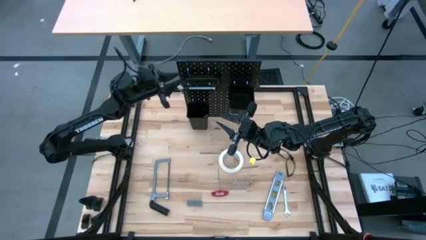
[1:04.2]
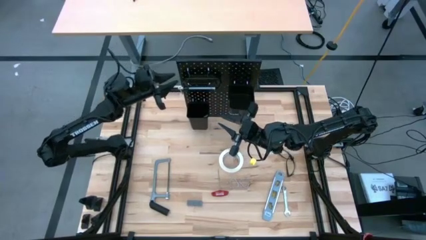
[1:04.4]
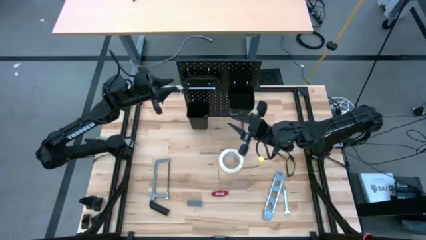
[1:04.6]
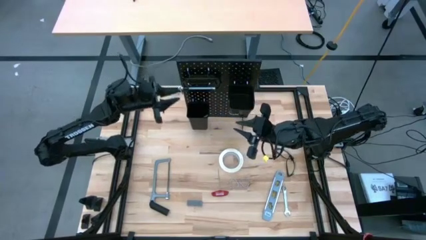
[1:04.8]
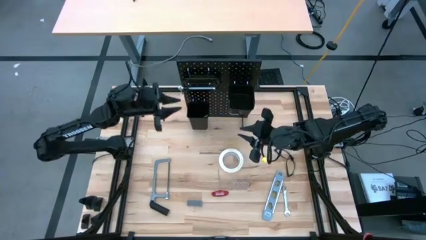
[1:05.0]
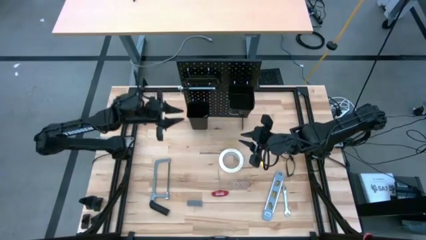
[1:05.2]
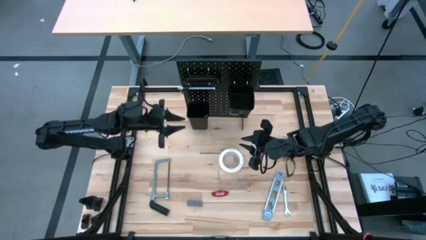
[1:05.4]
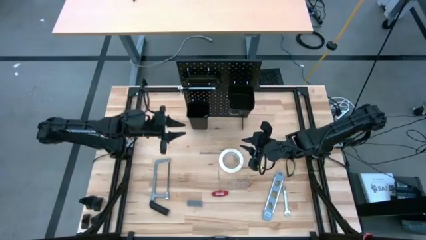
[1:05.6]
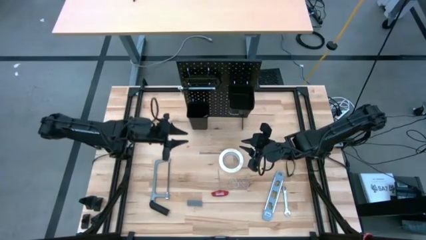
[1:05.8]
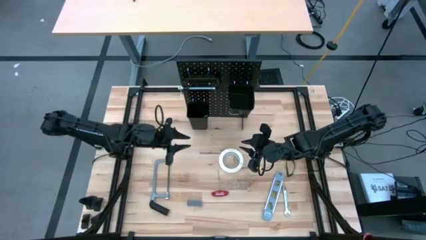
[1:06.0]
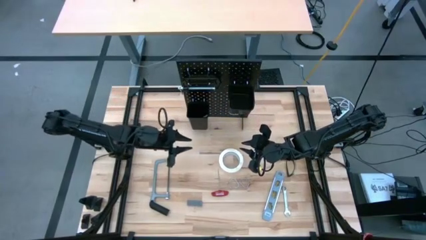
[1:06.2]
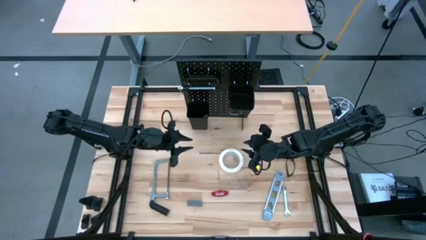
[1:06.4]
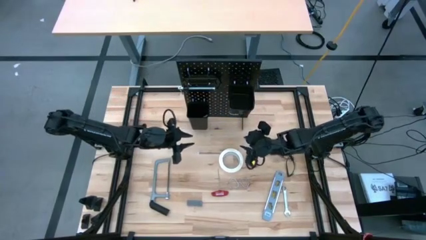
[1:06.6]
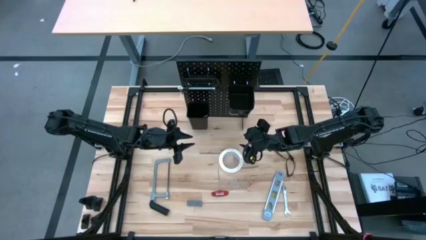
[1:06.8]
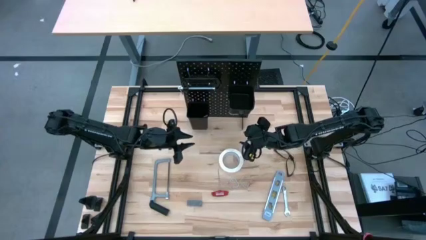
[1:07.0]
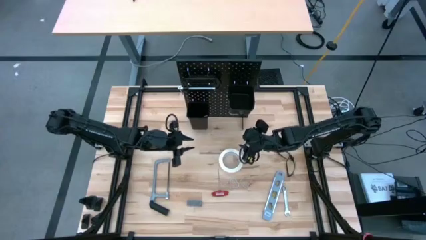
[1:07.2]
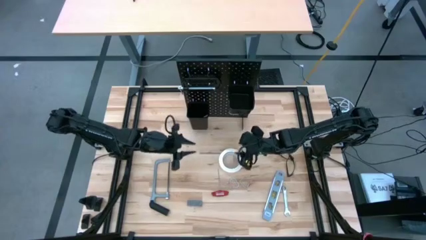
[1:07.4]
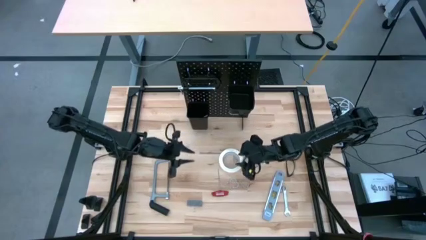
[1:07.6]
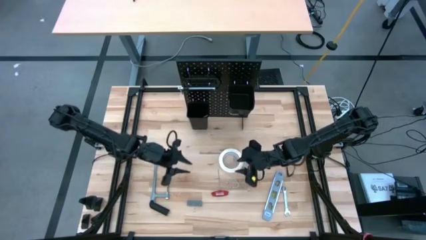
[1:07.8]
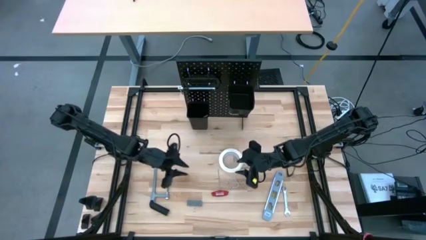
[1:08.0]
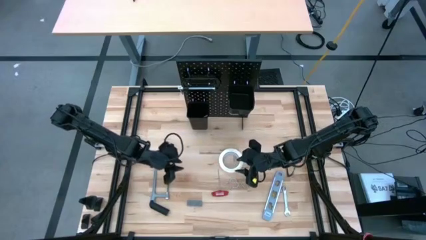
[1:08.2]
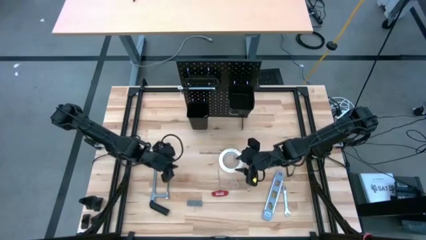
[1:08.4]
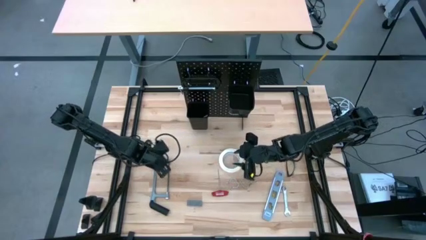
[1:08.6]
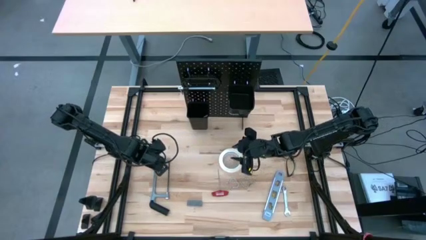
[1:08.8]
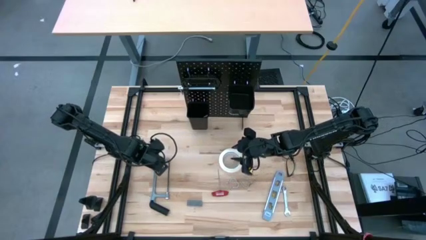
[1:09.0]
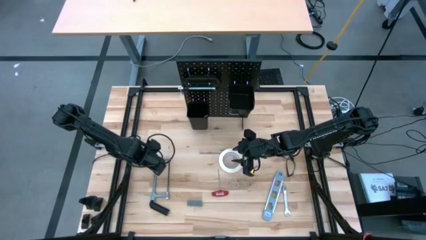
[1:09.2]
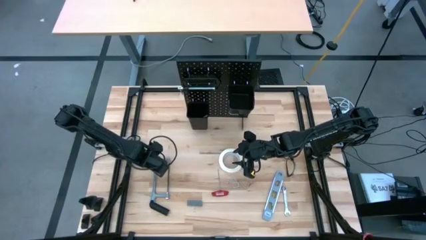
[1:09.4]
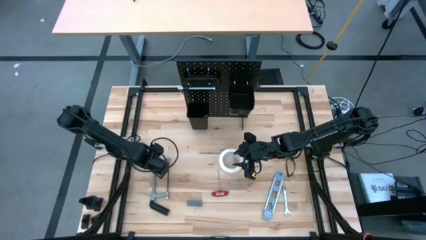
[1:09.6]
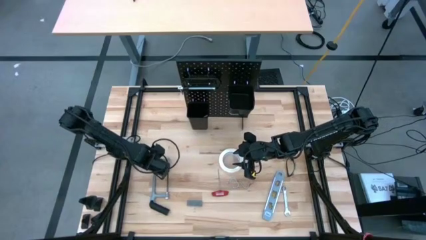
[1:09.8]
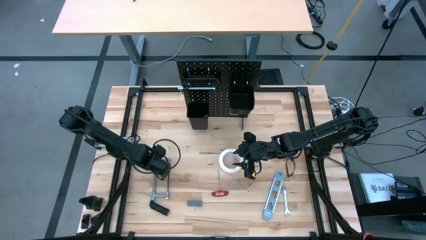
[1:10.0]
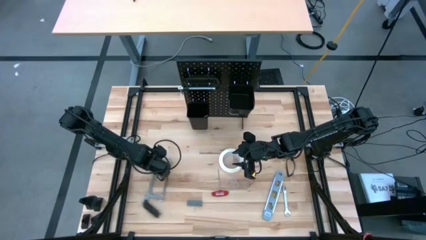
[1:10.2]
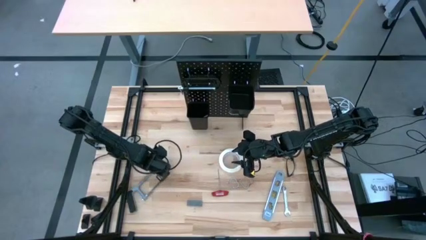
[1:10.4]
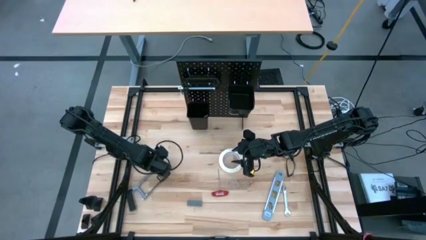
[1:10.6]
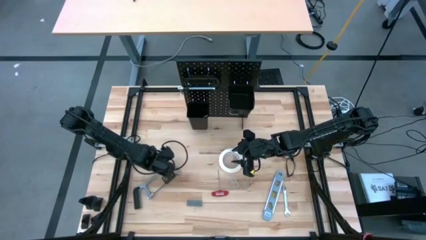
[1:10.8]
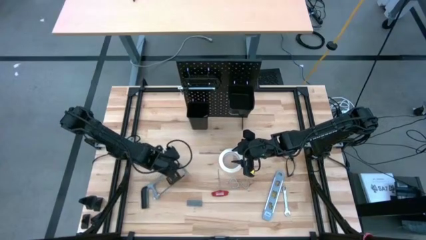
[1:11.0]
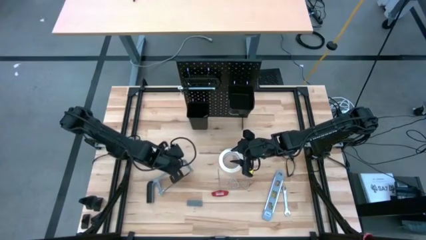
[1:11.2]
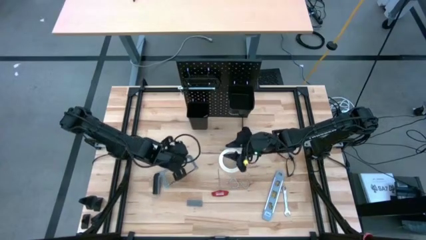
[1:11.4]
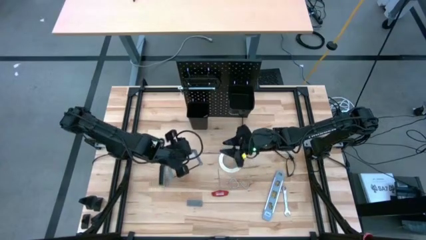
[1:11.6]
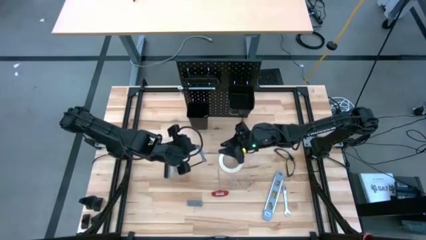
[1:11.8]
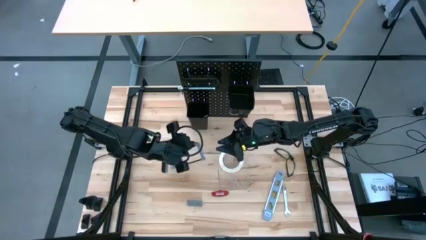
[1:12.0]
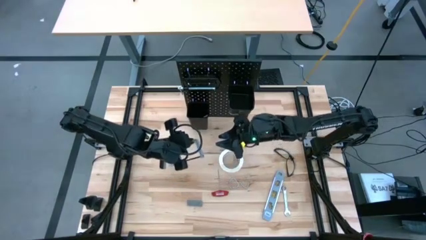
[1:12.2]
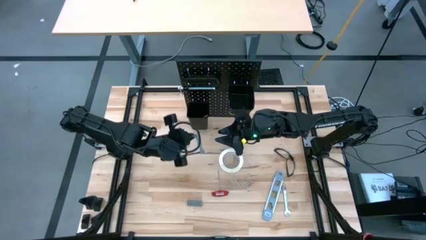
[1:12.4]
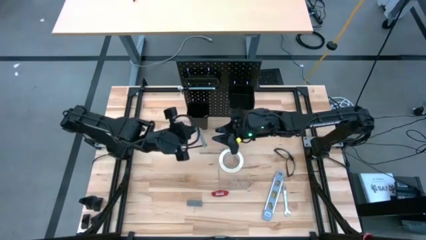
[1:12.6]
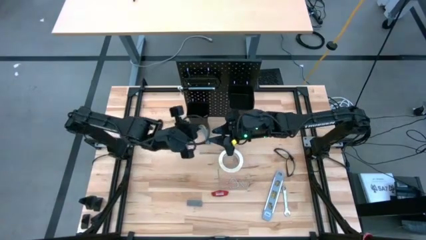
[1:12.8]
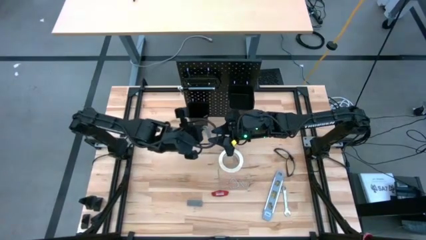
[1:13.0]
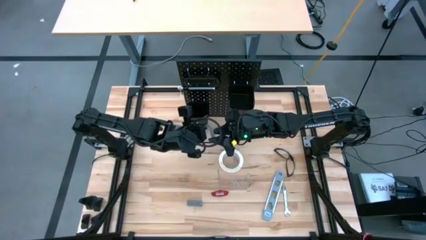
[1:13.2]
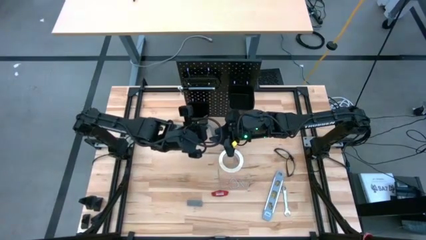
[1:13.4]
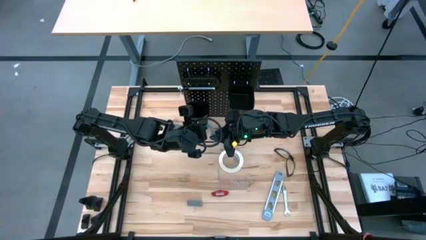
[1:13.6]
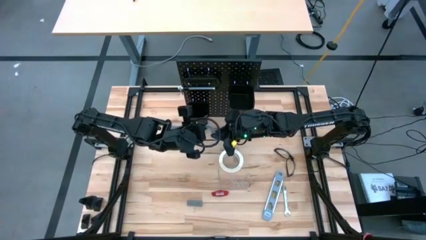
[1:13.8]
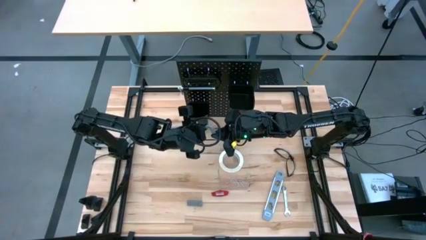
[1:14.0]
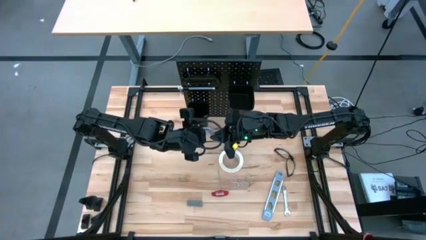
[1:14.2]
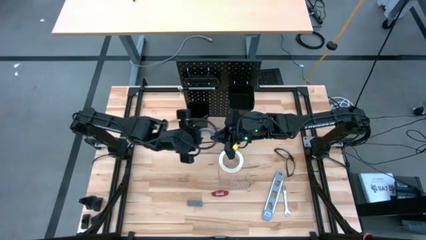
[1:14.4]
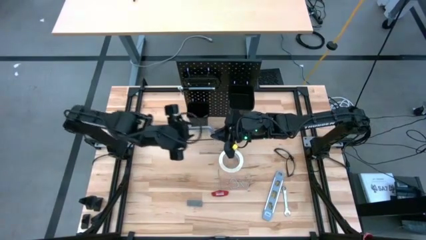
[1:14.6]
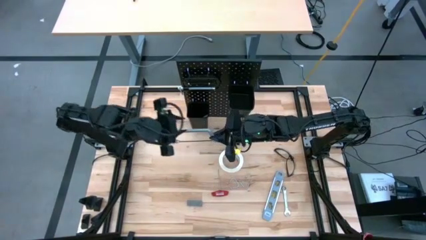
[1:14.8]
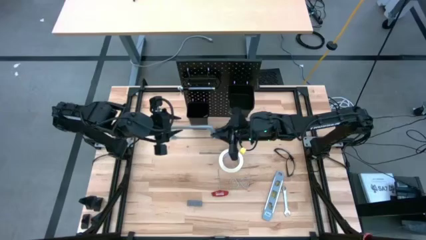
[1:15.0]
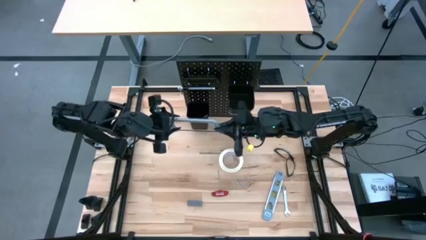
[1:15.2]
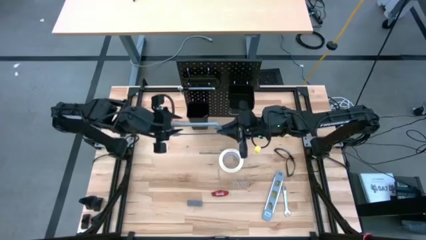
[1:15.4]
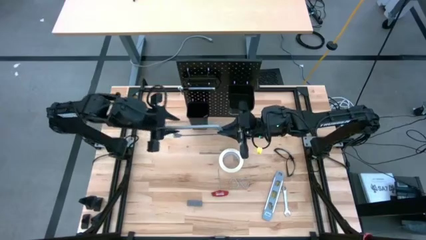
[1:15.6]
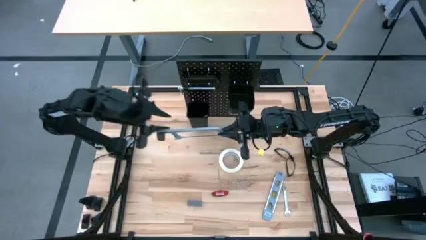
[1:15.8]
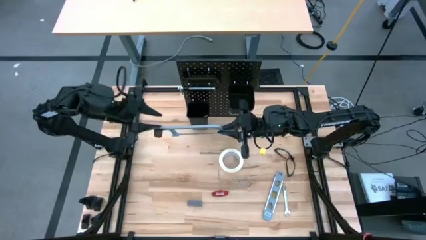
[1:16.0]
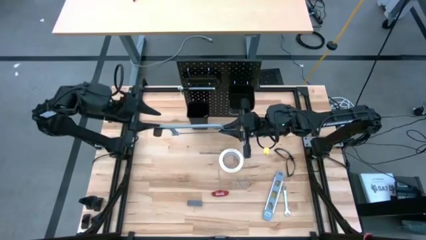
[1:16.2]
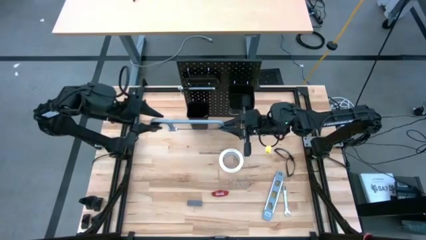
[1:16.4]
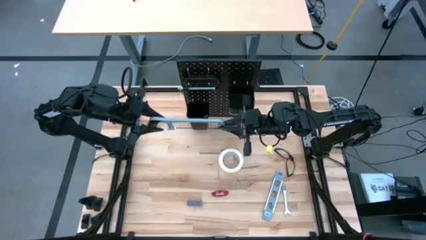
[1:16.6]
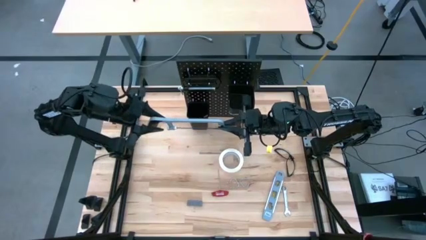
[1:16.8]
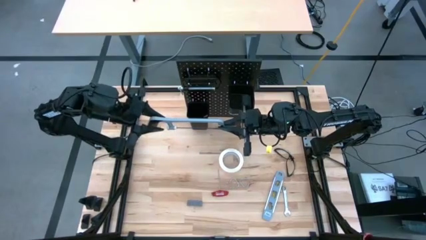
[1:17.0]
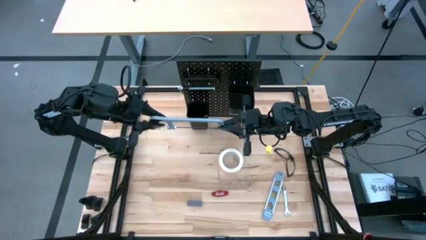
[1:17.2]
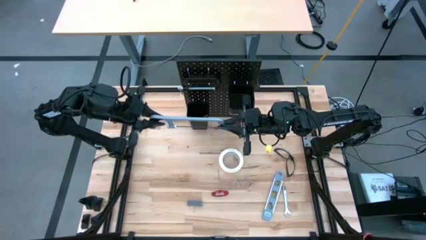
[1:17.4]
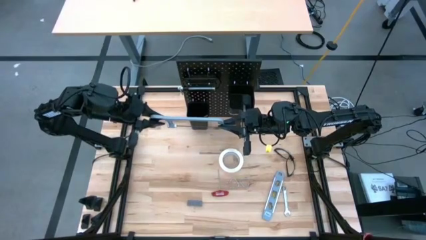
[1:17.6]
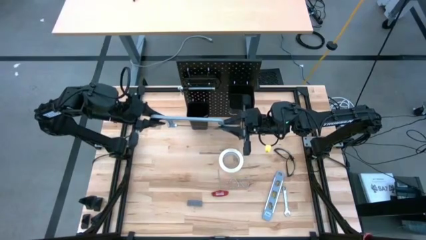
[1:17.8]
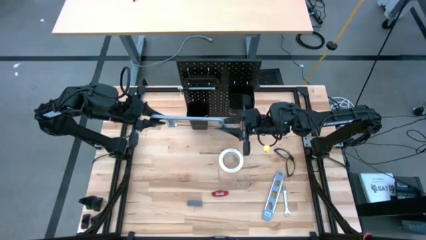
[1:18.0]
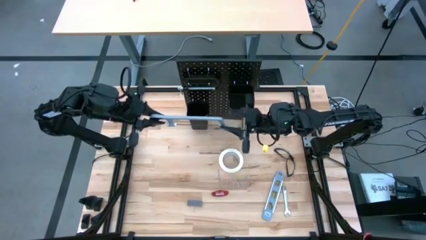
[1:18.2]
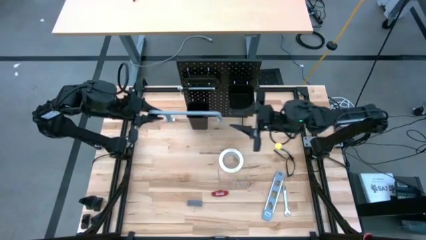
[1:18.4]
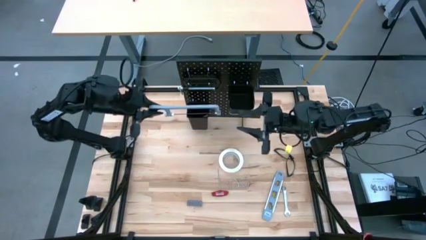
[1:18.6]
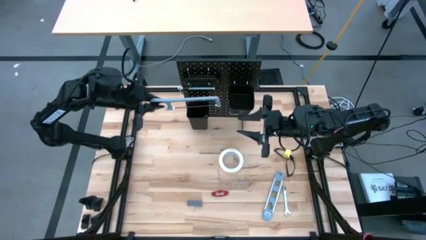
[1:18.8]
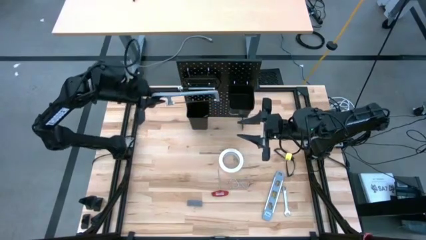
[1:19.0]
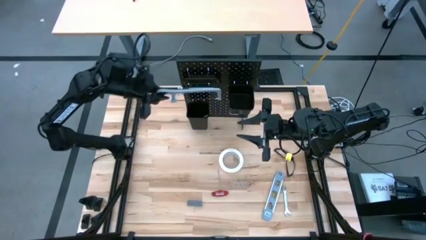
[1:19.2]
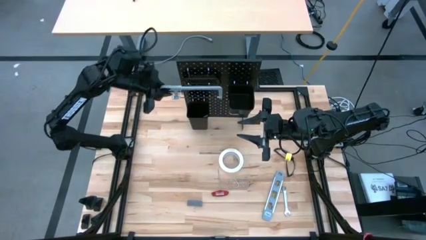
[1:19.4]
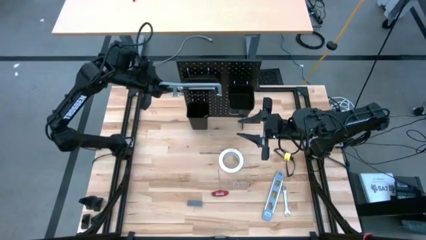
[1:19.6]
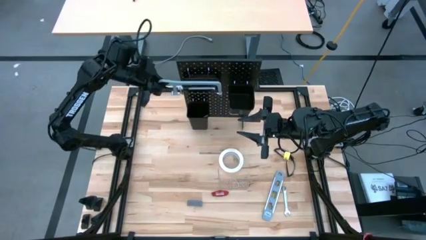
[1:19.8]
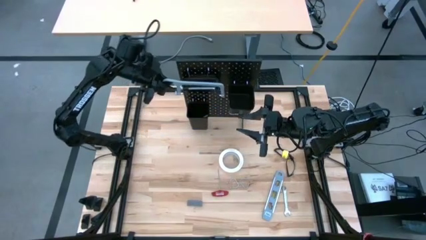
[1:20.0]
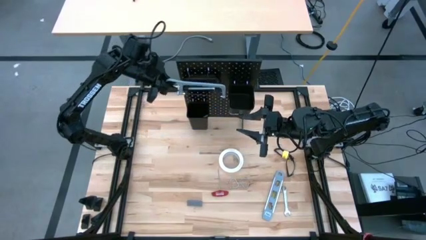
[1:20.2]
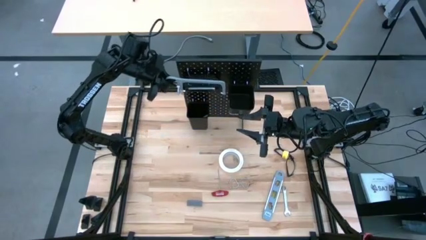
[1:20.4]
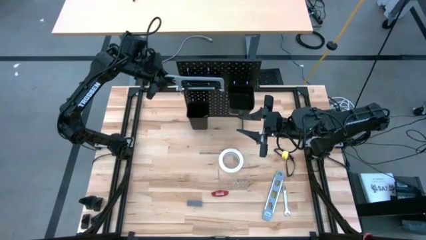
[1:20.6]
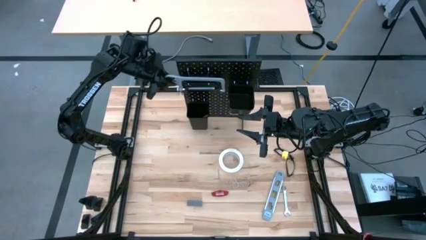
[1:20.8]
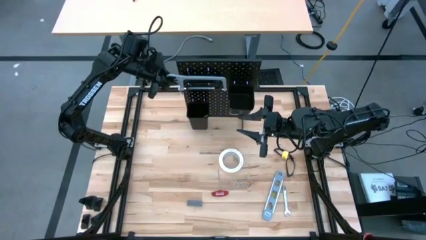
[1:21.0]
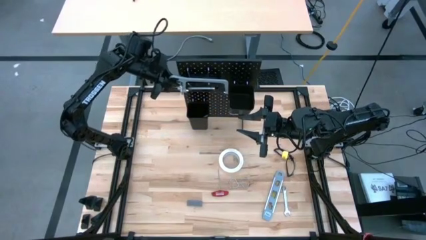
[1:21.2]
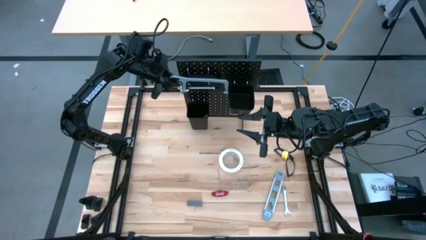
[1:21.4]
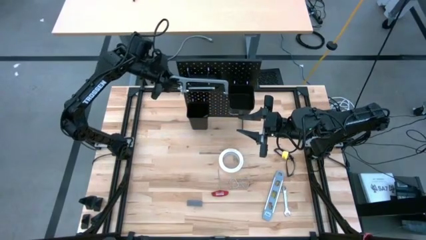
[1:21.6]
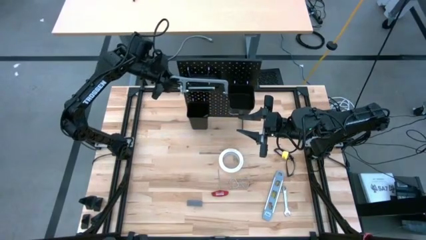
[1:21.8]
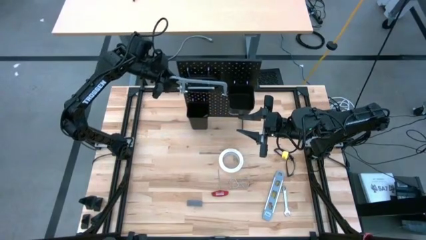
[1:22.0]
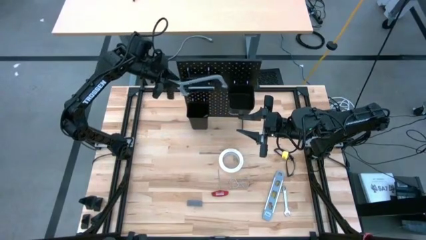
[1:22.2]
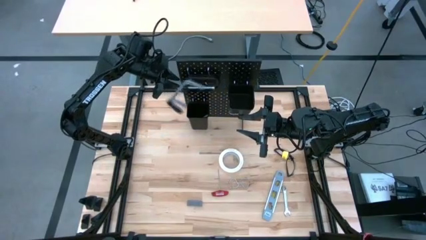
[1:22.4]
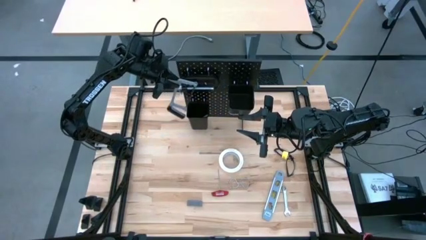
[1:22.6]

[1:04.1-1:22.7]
Task: Hang tools onto peg board
Hang the gray hacksaw on the black peg board
